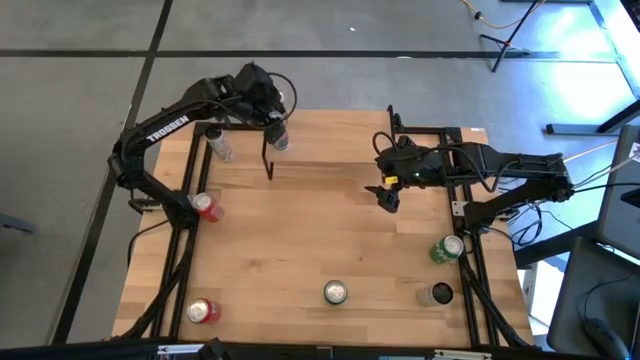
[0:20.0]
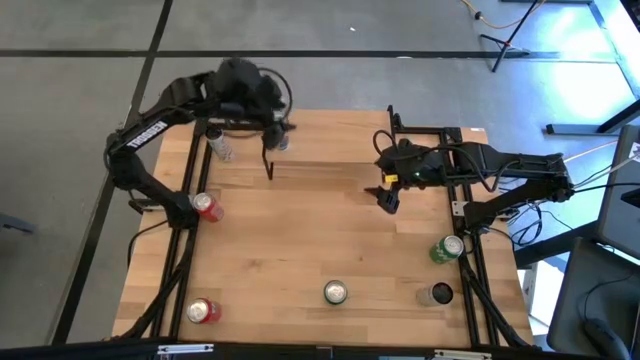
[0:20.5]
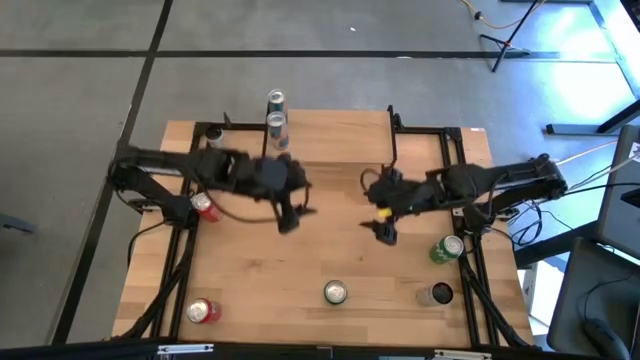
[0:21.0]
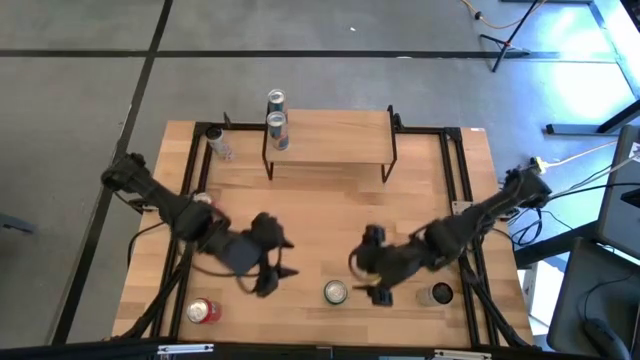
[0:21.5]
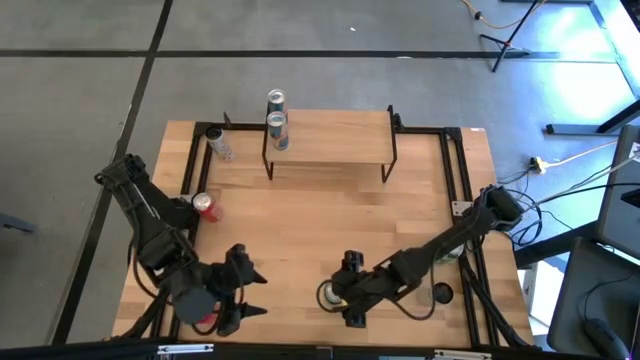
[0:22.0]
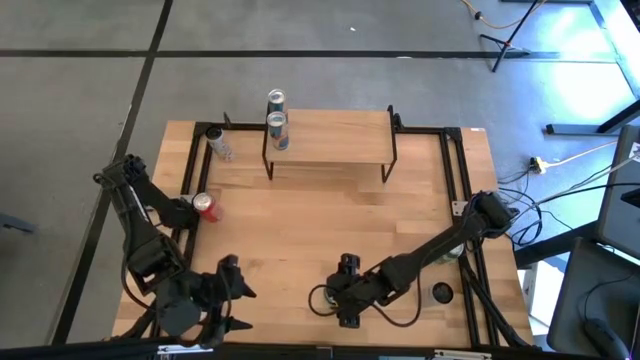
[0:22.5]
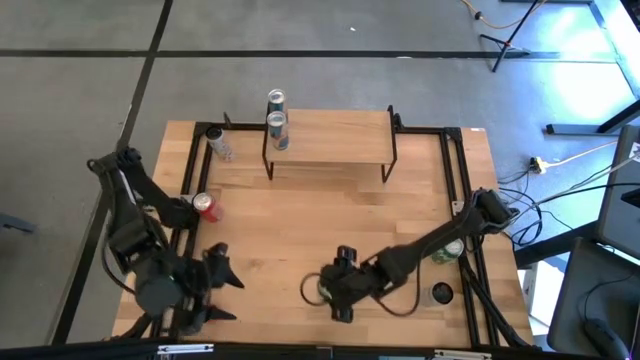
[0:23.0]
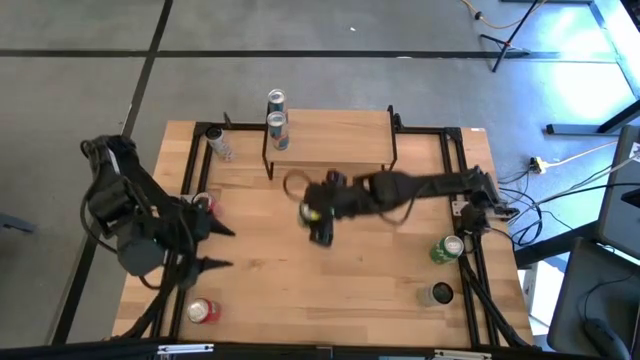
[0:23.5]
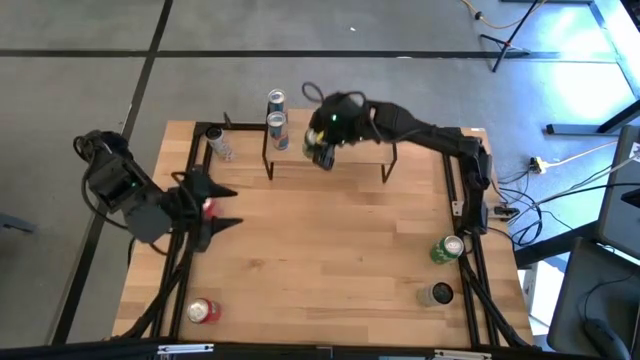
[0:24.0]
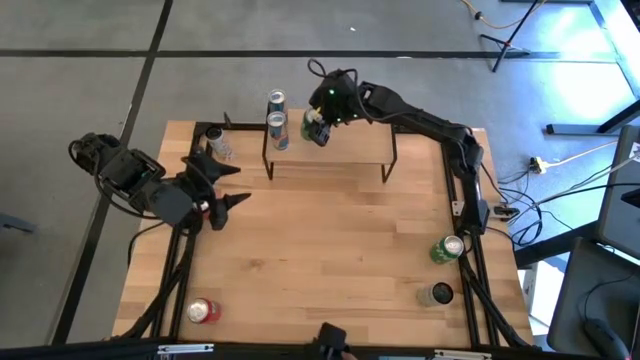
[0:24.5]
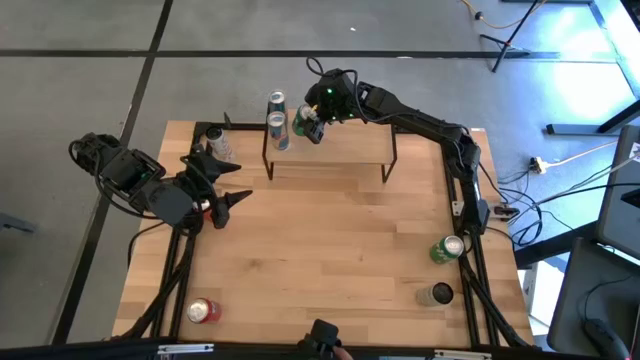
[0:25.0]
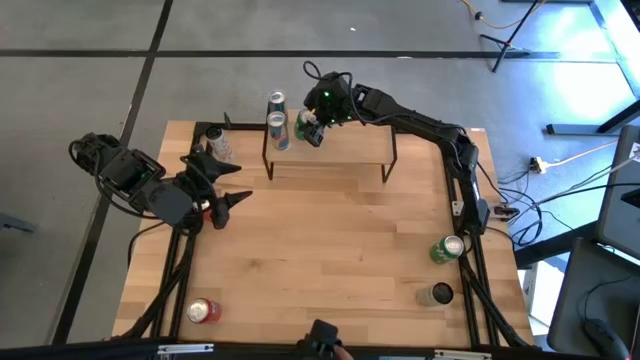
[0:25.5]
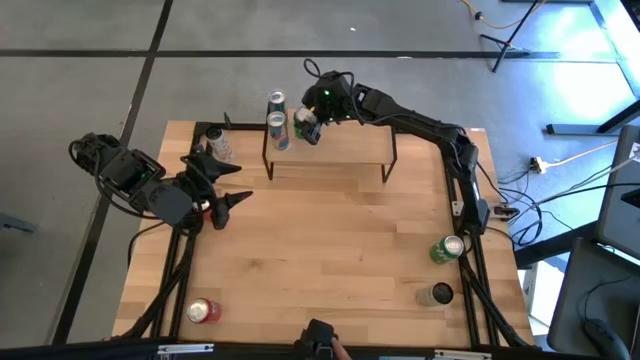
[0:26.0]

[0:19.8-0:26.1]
Task: Place canned beverage on shelf
Put the left green soda can on the shelf

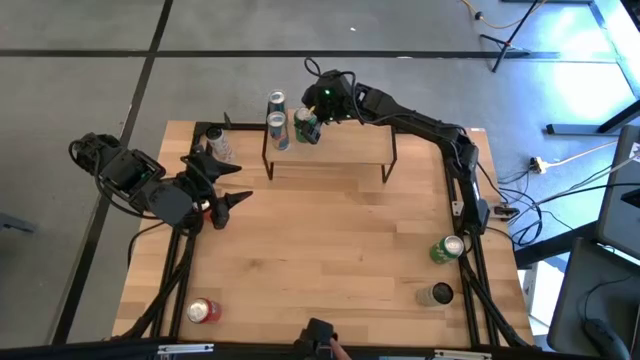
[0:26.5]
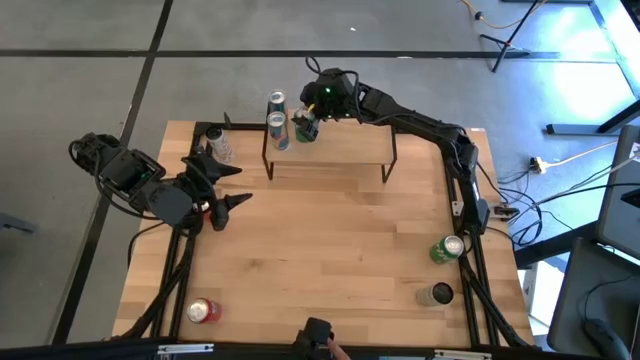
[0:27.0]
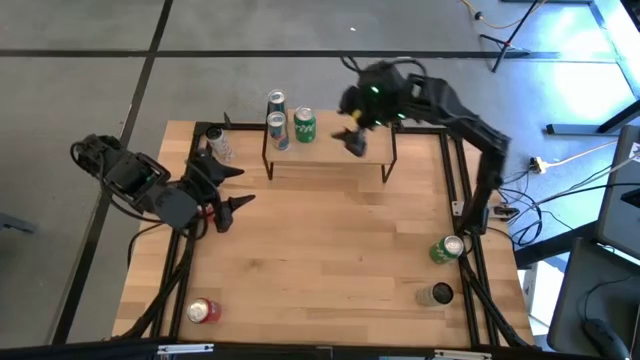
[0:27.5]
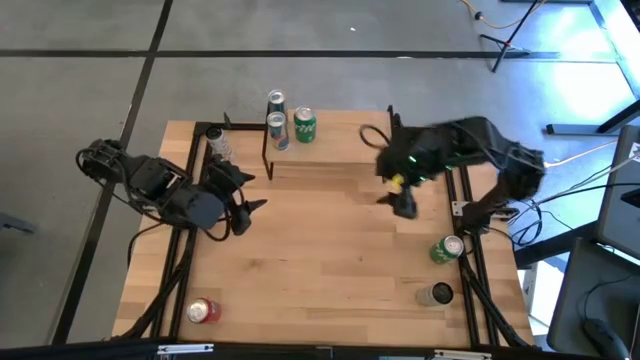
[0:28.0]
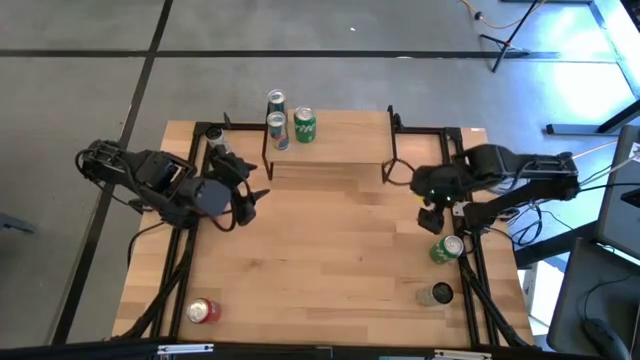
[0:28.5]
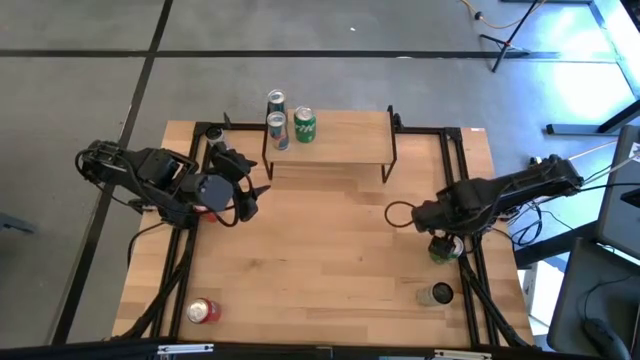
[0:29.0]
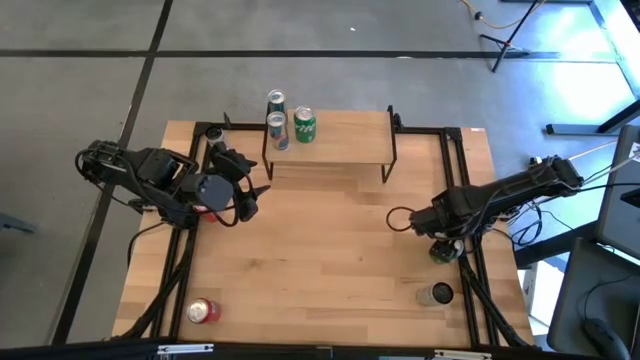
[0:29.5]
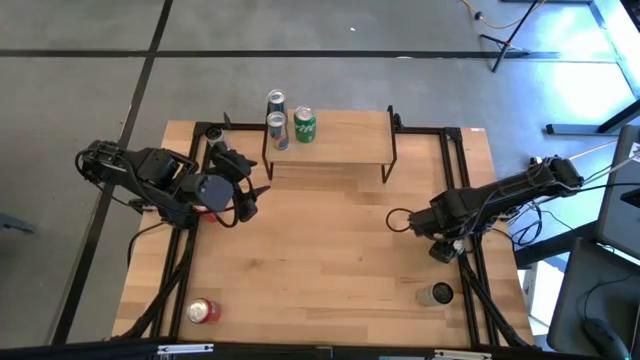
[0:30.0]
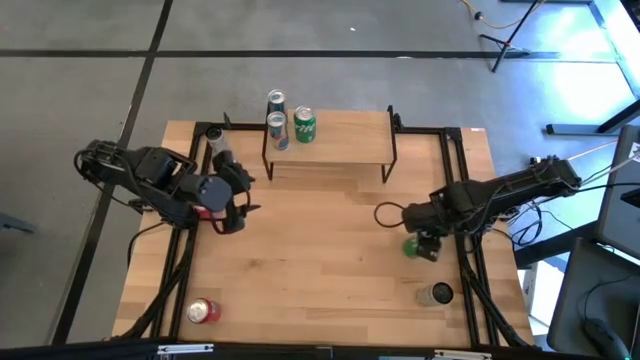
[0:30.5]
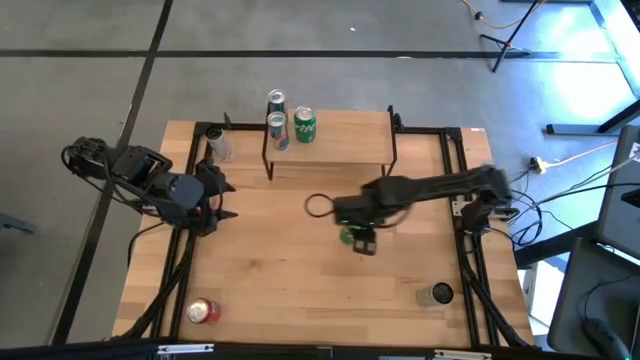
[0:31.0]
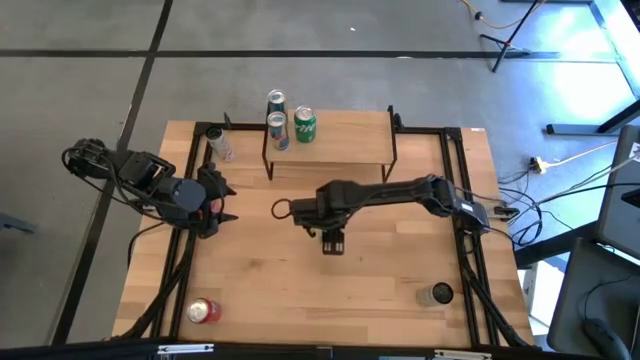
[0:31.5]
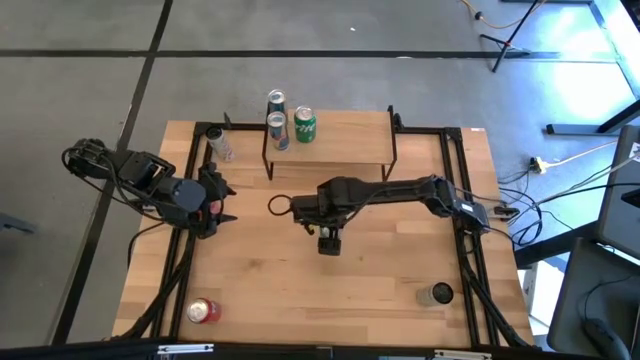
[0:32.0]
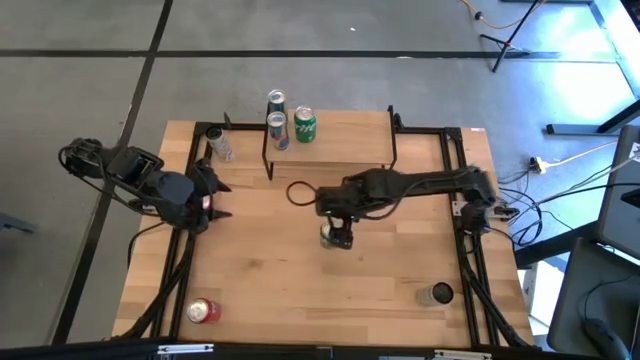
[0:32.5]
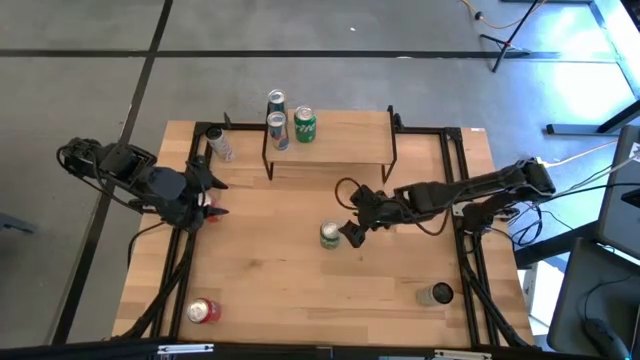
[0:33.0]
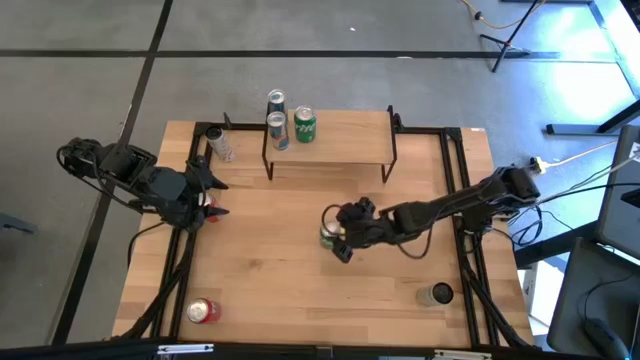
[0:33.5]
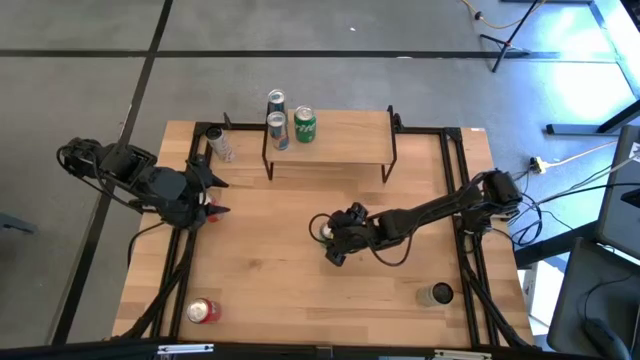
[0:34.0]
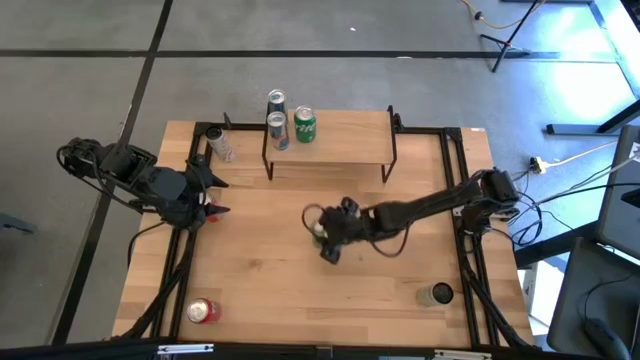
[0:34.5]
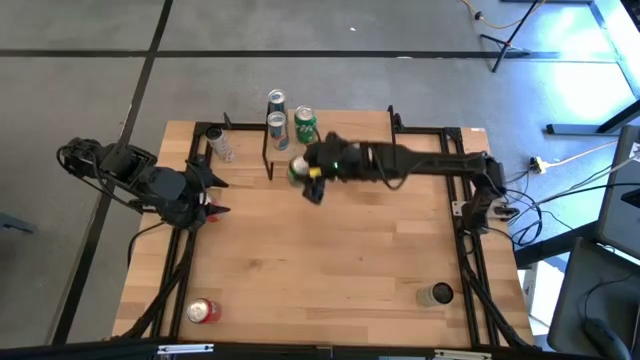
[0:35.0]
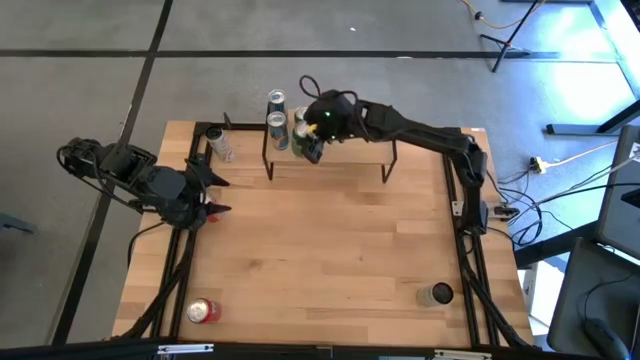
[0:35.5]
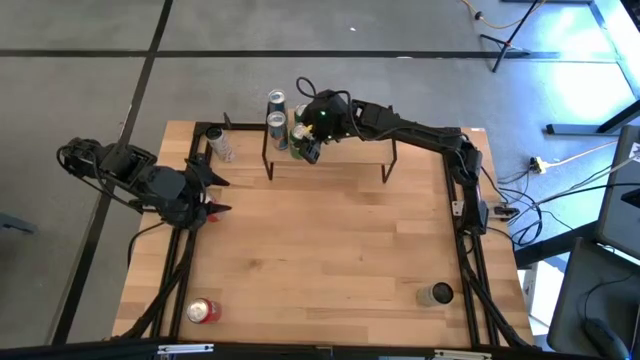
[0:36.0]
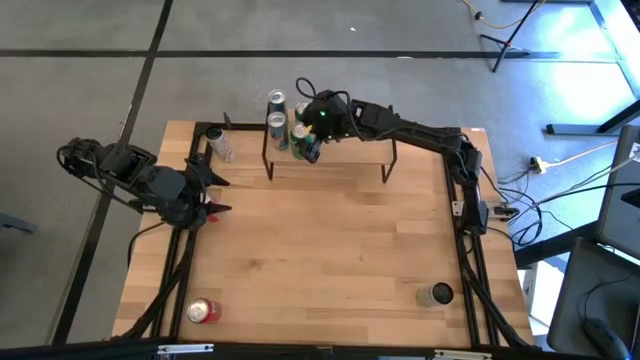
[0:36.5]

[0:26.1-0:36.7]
Put the green soda can on the shelf aligned with the other green soda can

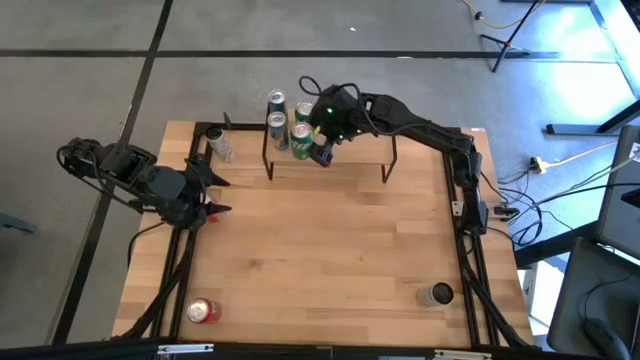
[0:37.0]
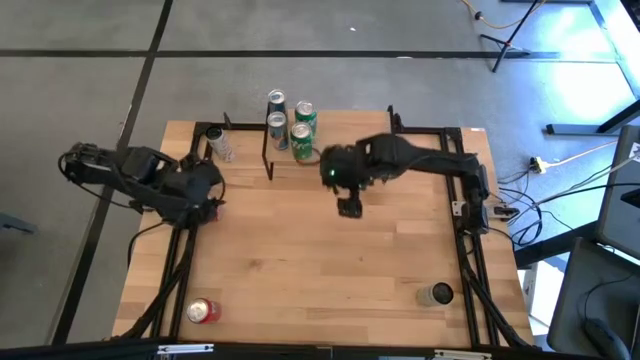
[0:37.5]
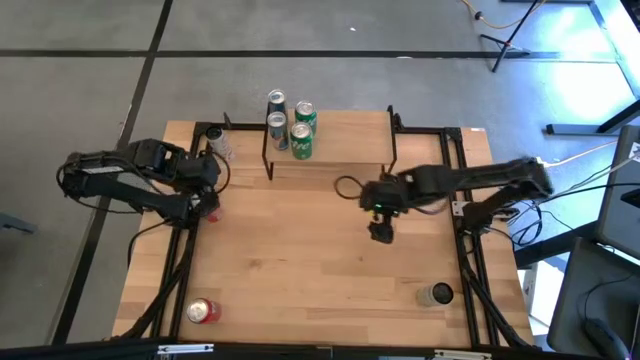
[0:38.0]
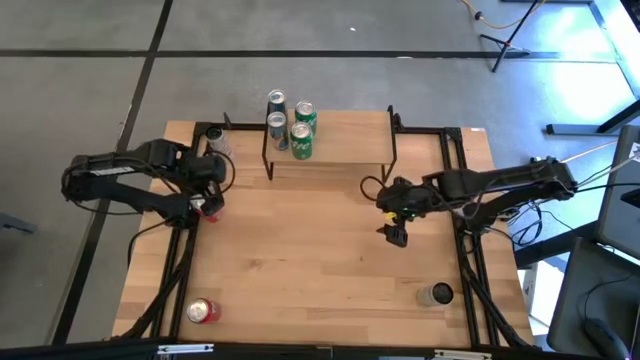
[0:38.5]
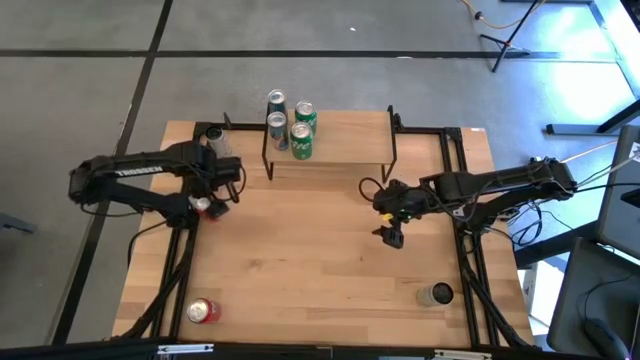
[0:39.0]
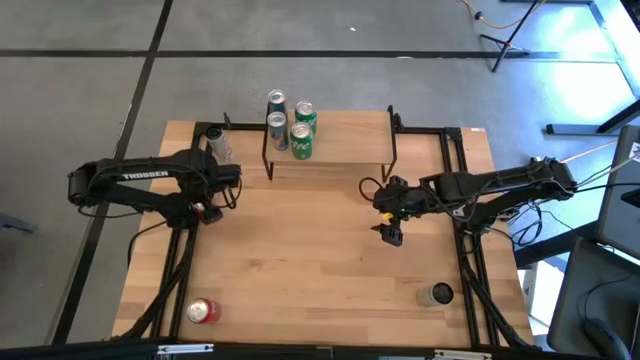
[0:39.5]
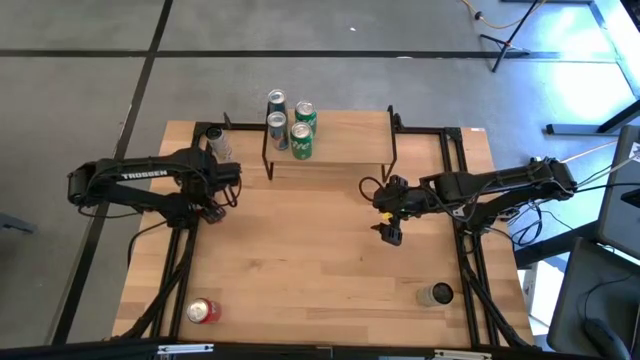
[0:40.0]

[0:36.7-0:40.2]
Put the top orange soda can on the shelf
